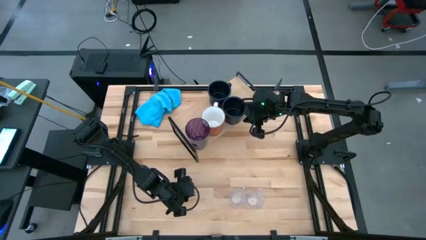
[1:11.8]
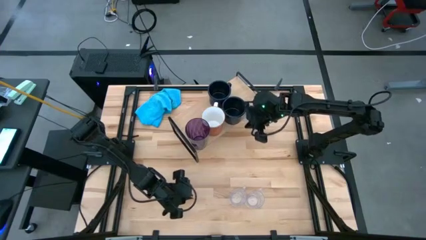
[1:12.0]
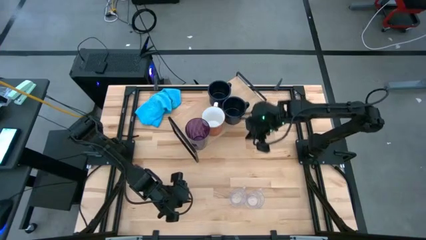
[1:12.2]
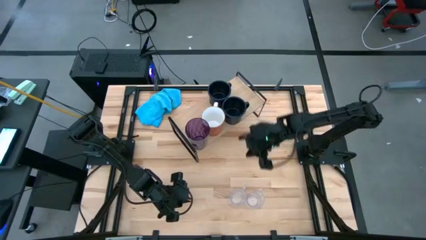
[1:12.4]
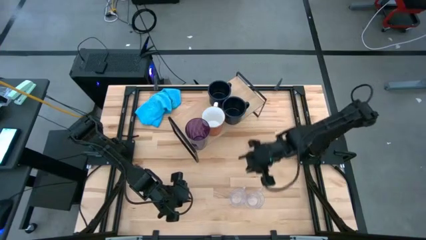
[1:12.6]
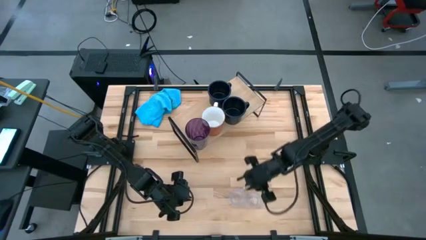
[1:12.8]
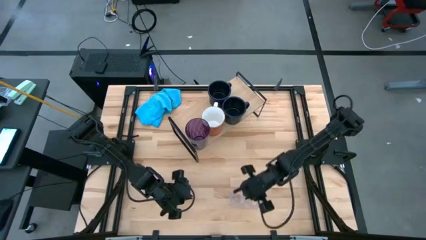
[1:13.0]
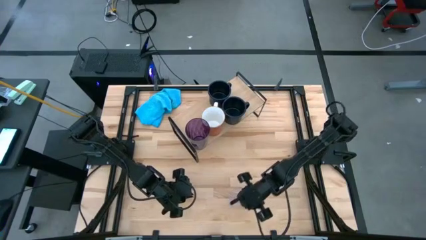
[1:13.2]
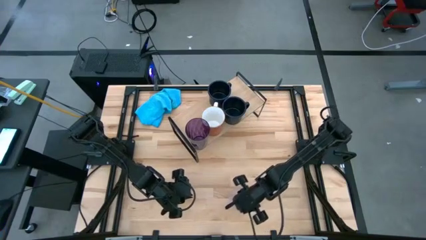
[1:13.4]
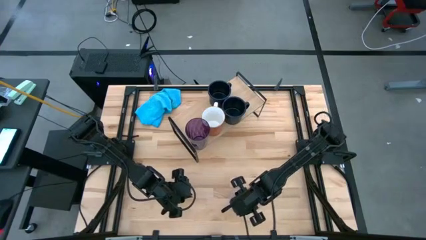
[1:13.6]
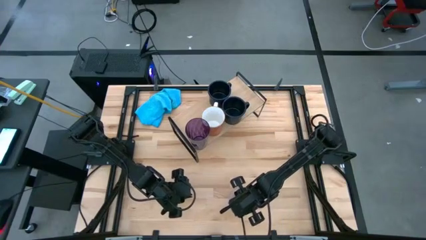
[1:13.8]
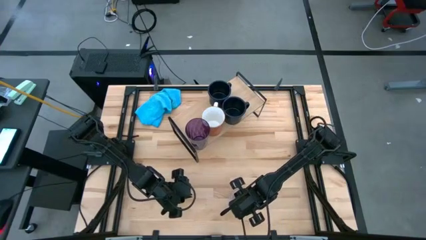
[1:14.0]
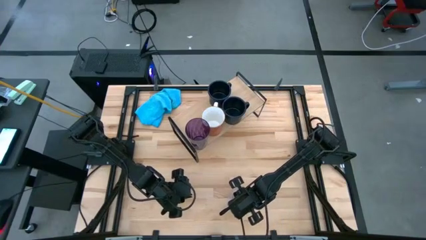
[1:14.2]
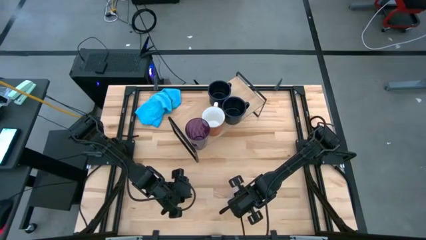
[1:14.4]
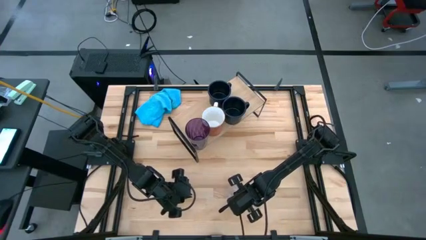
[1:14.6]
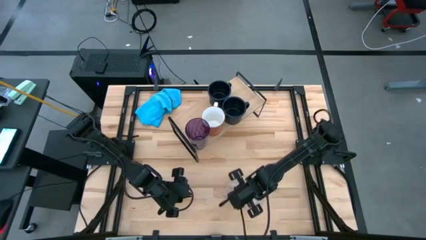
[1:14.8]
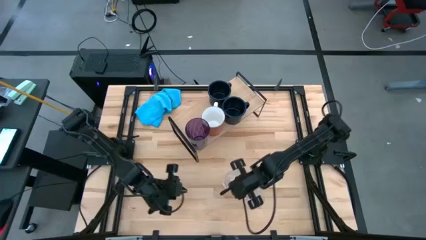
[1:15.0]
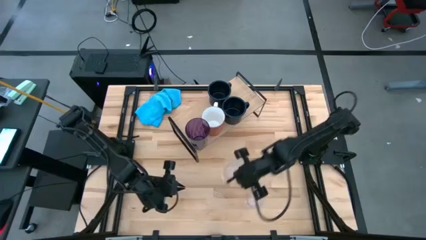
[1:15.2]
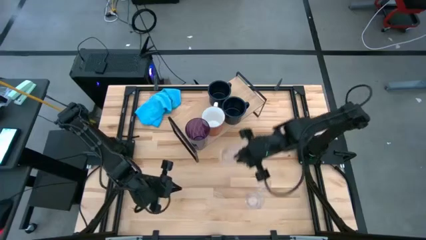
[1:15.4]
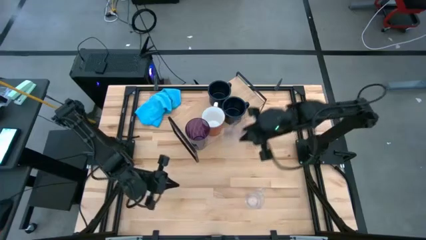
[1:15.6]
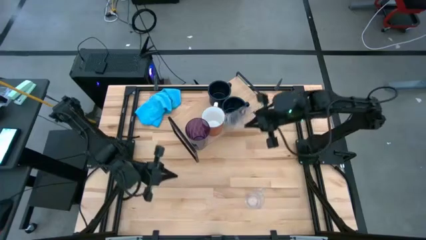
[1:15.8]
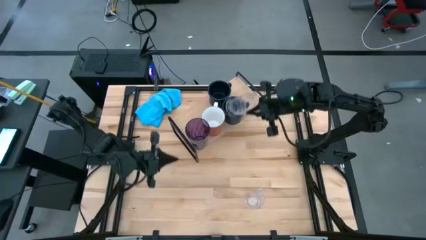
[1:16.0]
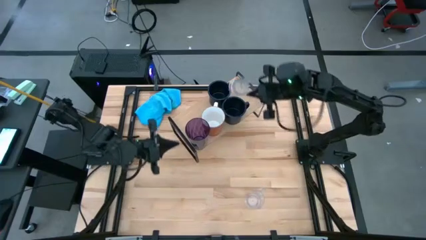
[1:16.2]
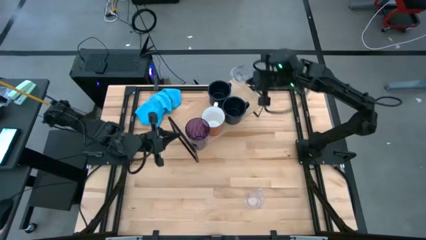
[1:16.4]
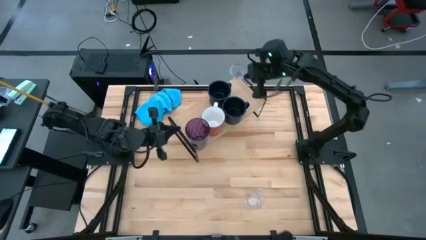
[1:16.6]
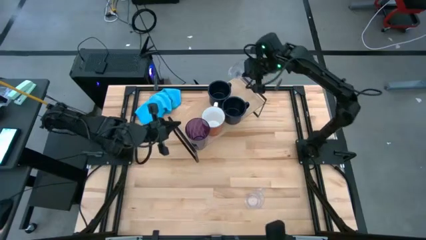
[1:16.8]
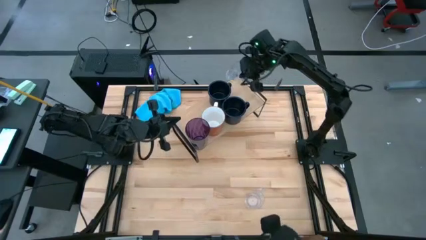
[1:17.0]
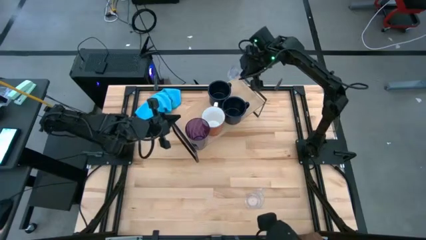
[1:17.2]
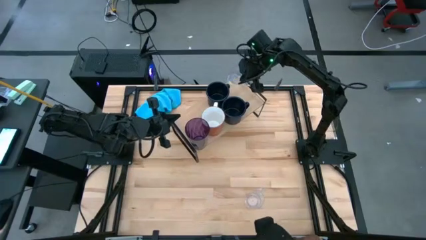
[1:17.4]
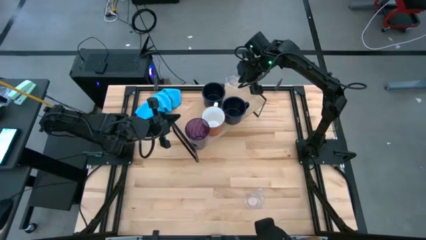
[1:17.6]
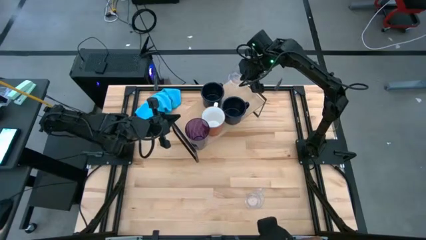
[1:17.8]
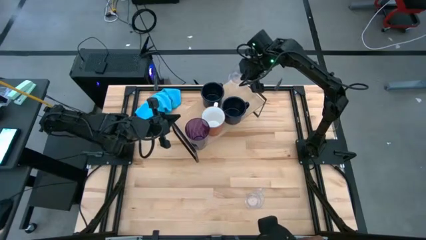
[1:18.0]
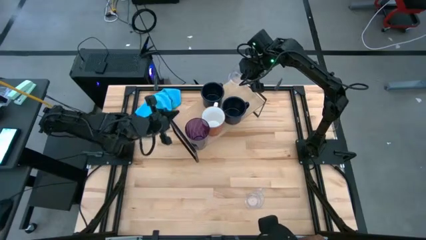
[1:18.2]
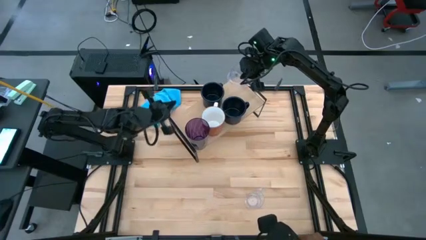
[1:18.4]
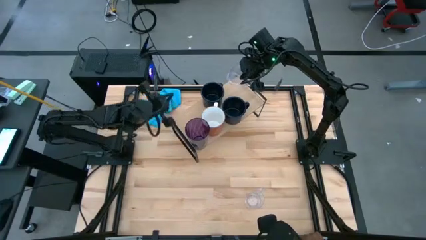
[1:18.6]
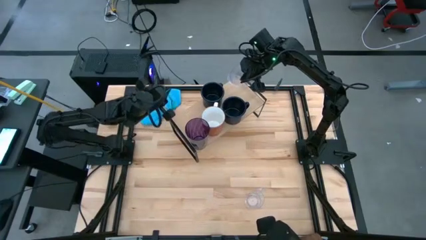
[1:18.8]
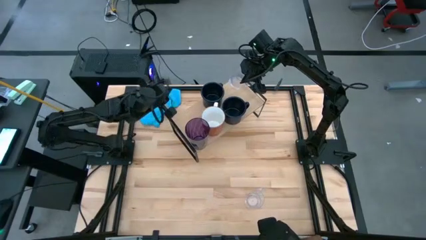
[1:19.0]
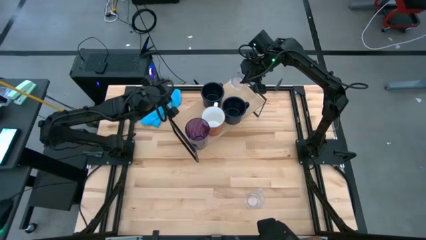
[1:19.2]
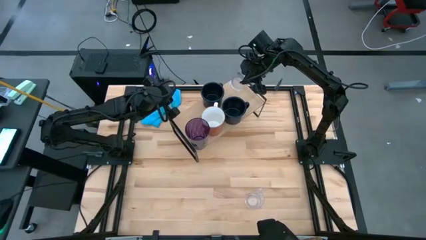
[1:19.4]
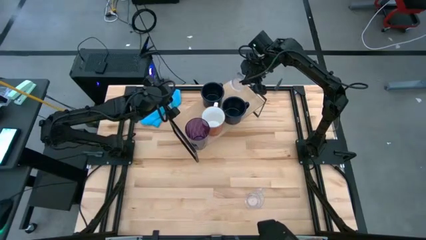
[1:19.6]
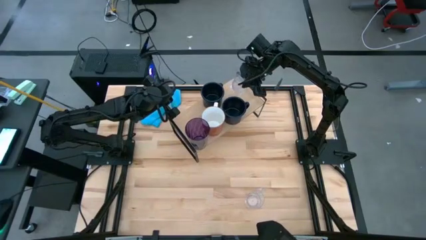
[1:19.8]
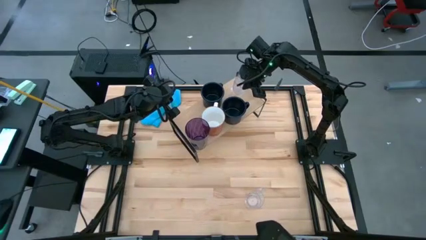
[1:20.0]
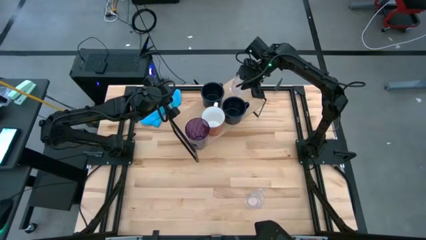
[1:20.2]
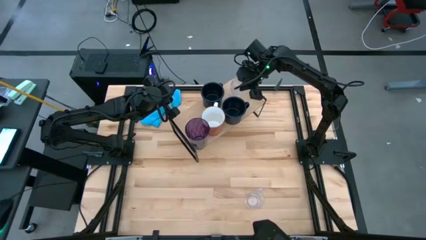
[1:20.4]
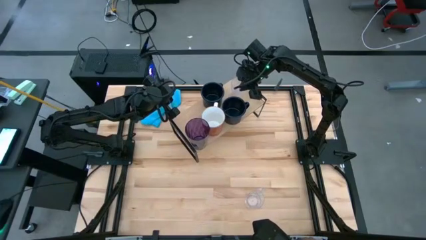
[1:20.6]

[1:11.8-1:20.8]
Task: Stack small to large cups/mugs on shelf
Put the left transparent mug on the shelf

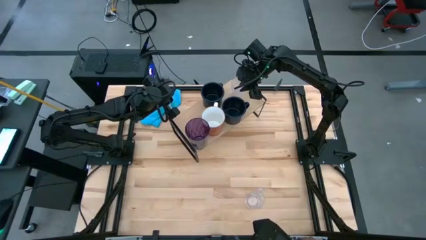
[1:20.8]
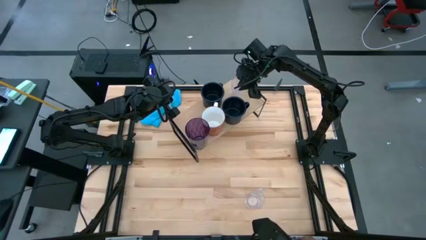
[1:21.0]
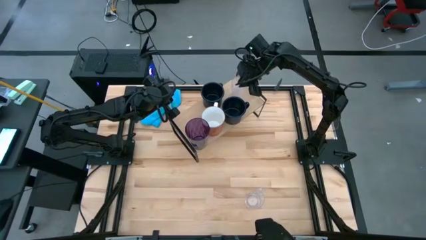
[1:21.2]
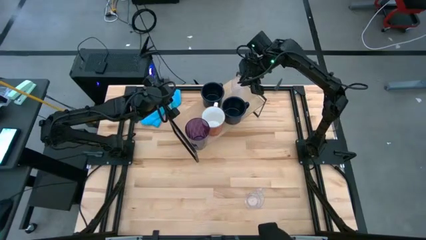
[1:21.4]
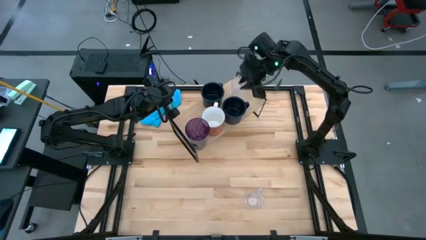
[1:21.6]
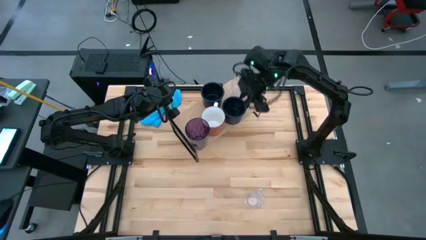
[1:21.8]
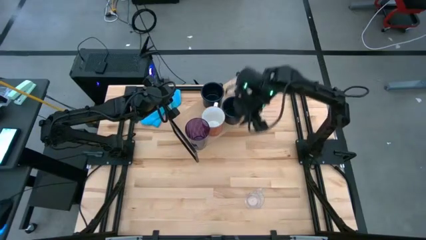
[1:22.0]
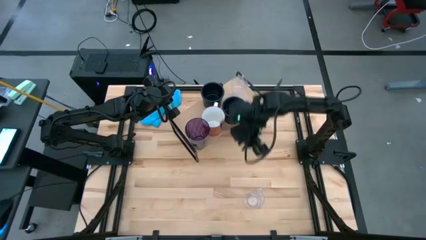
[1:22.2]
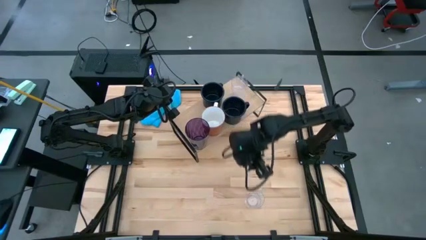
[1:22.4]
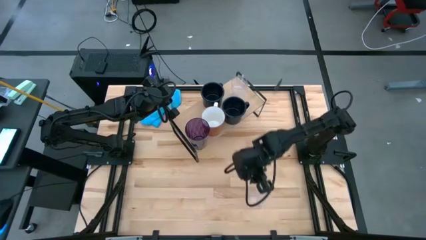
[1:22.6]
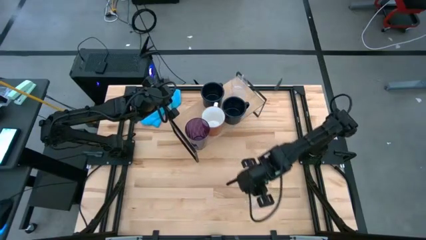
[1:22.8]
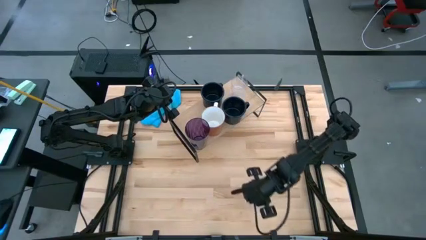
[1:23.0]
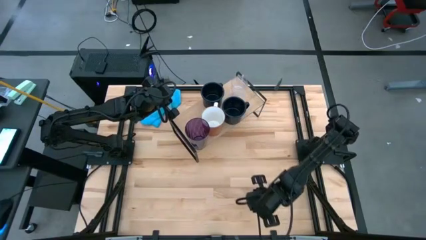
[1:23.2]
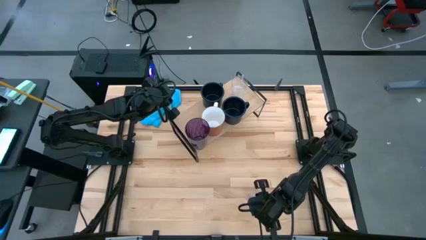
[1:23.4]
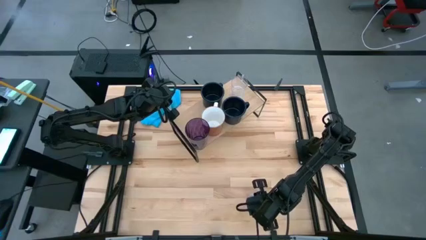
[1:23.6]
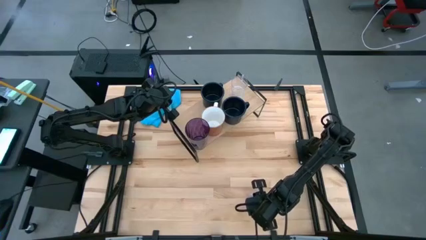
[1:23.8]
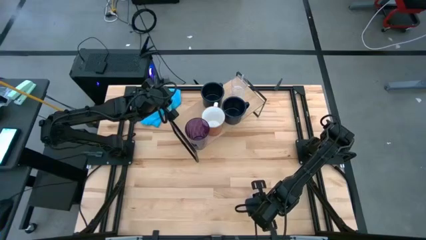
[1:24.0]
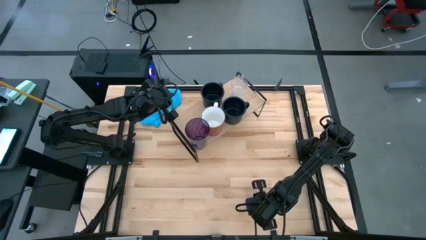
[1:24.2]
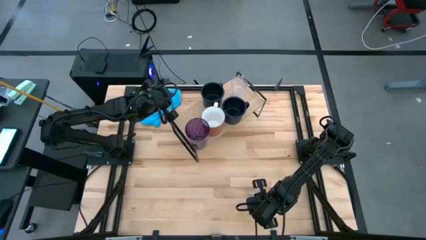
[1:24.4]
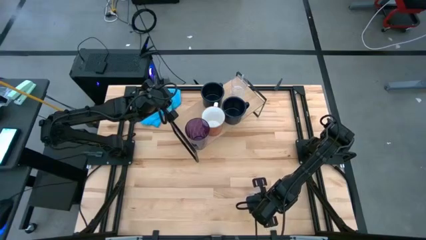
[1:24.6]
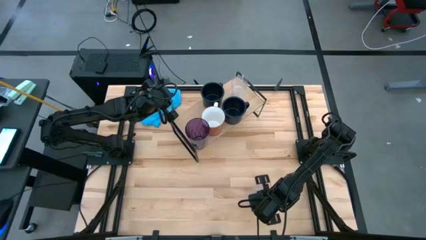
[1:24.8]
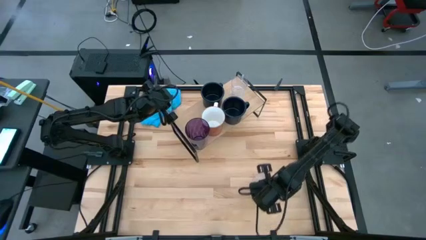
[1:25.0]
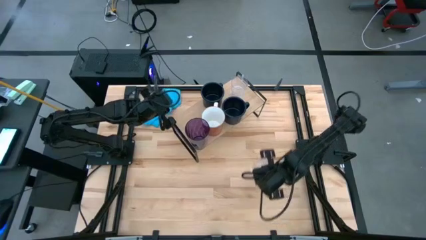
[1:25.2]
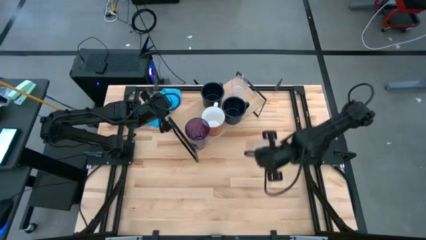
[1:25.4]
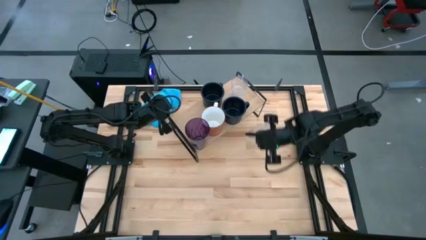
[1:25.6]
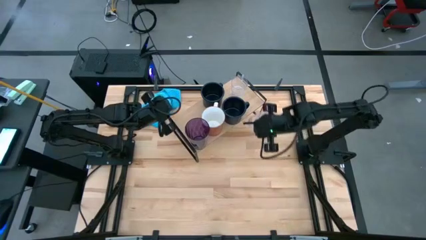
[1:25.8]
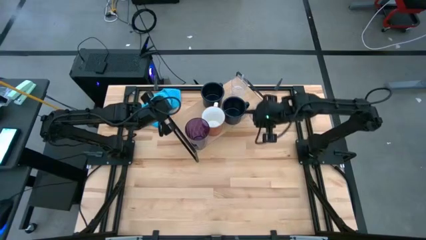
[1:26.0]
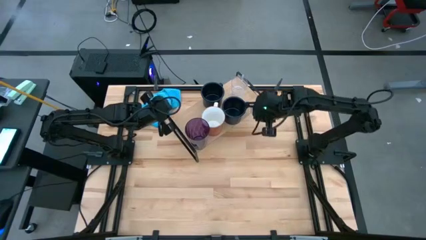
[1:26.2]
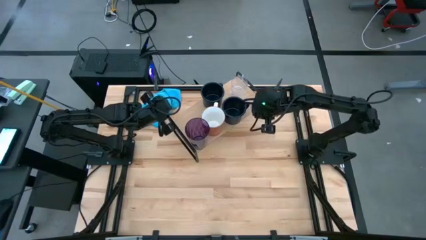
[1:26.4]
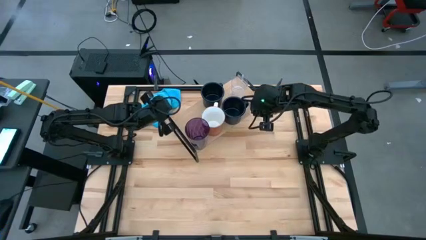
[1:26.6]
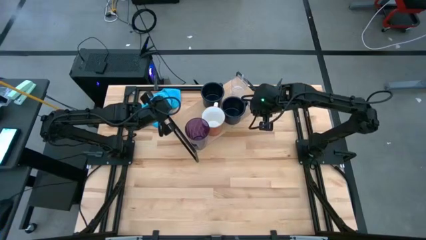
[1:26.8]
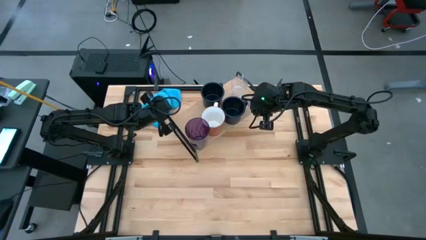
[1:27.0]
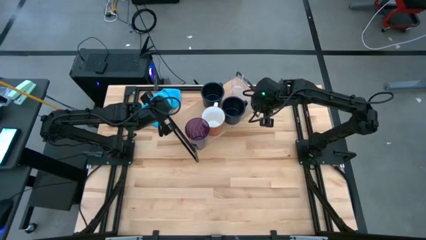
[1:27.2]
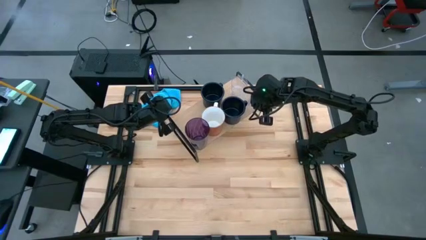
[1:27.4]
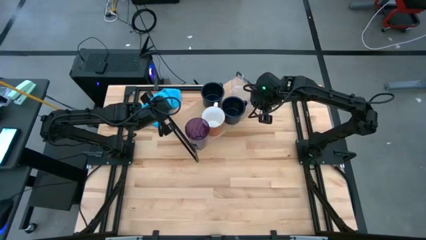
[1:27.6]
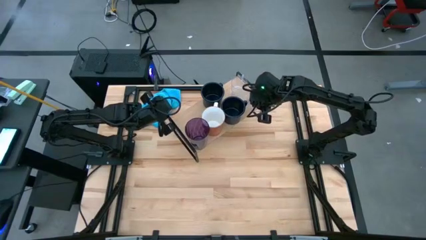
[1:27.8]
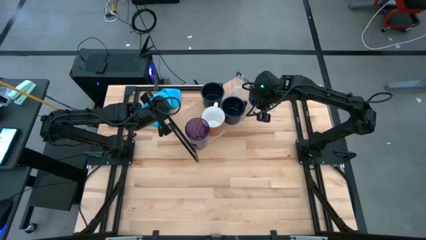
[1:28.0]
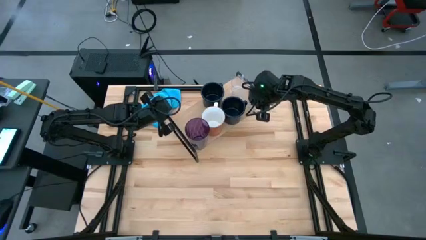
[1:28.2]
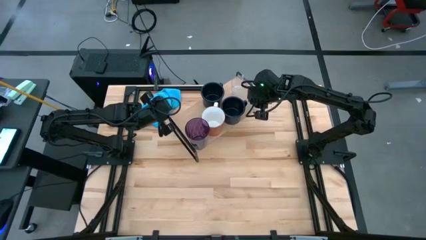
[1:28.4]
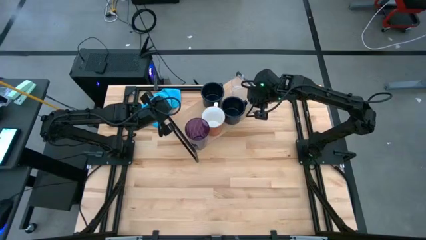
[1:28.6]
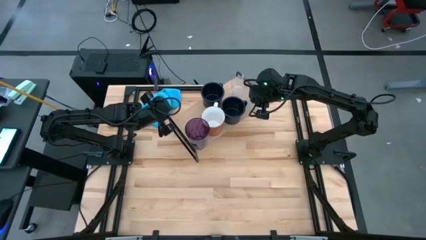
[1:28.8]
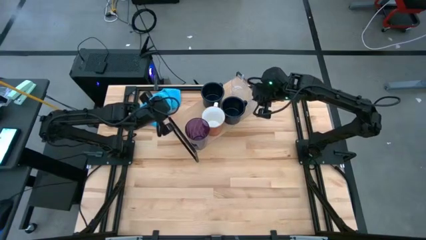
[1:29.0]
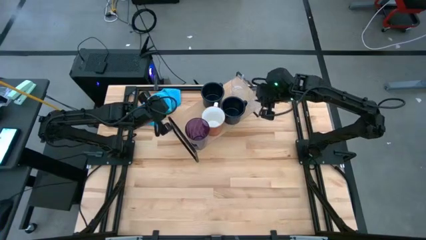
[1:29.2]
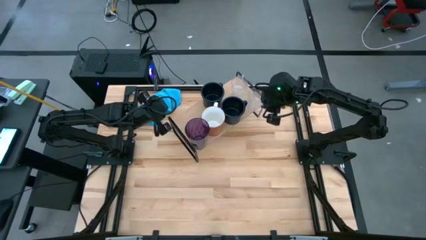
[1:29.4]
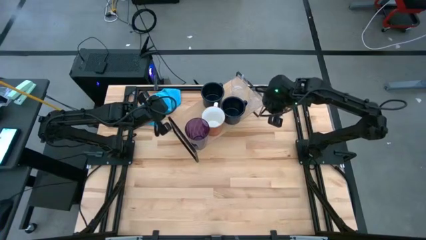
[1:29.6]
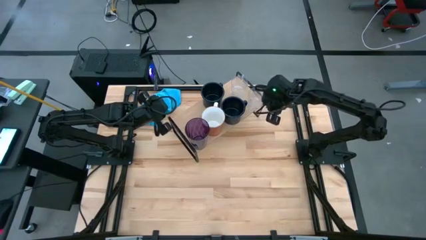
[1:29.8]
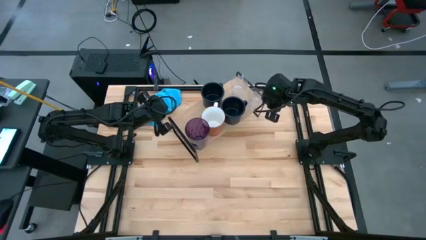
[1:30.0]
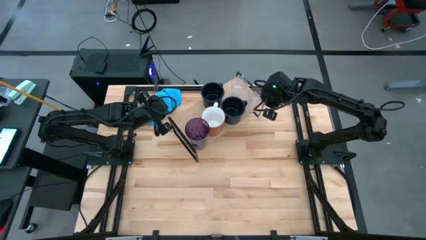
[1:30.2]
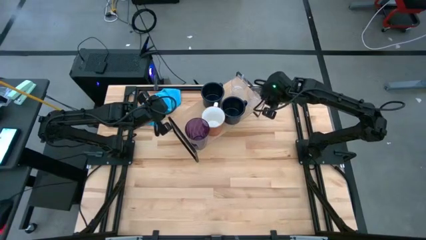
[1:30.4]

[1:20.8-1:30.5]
Put the transparent mug on the shelf
